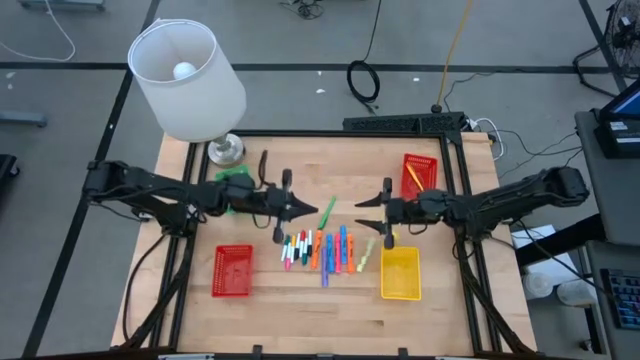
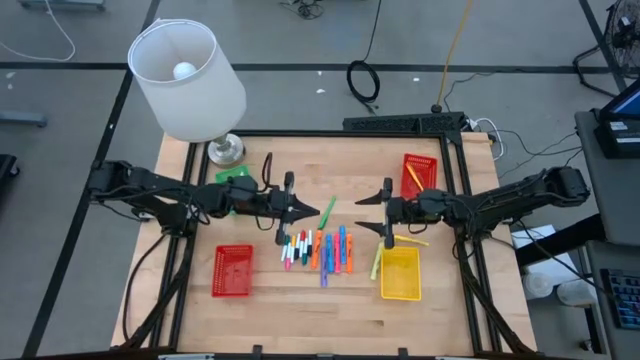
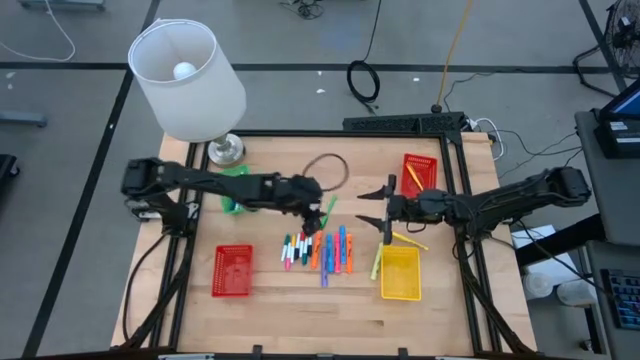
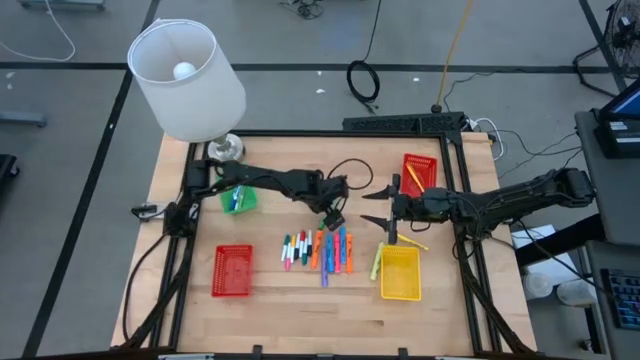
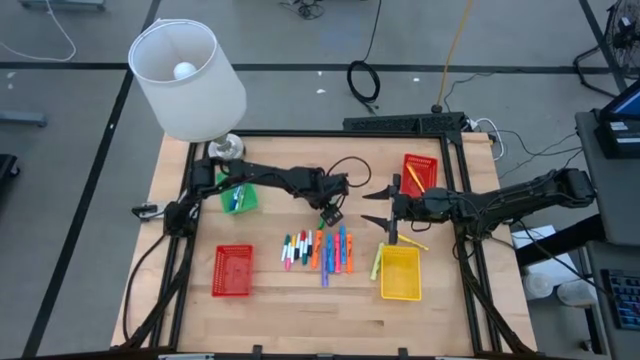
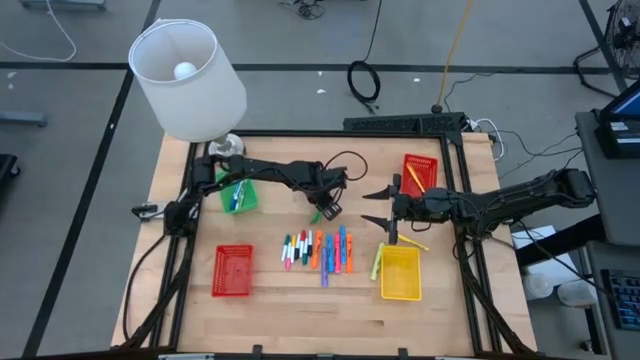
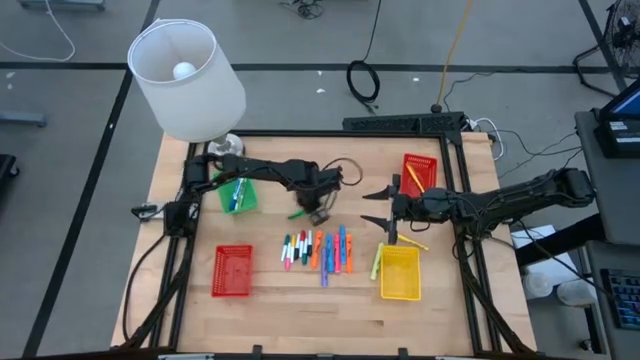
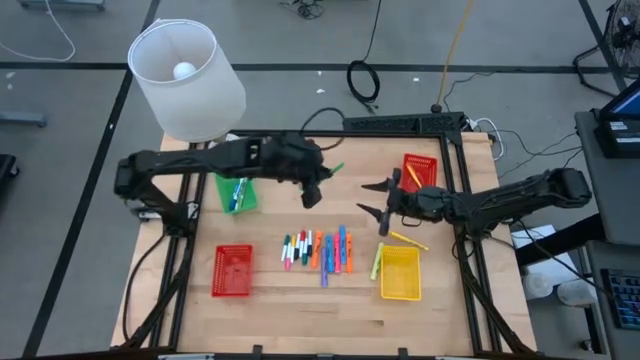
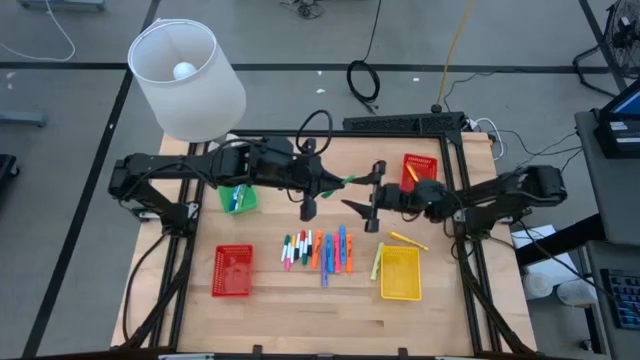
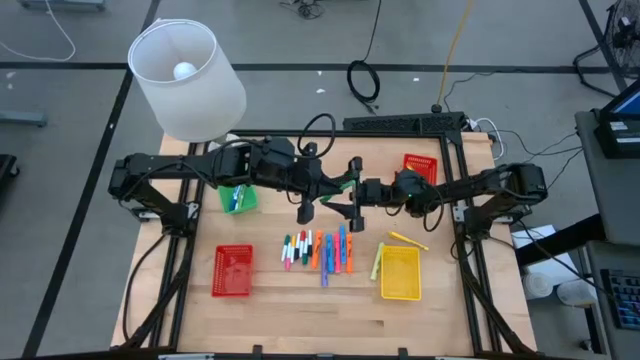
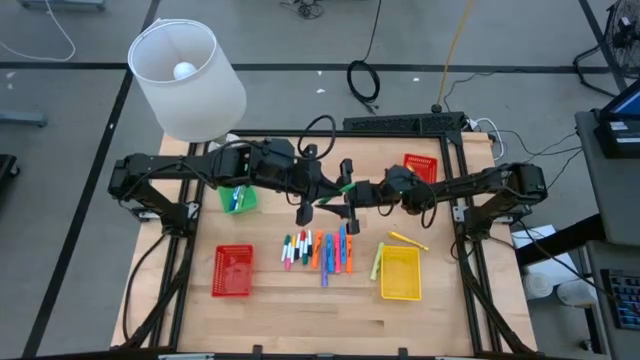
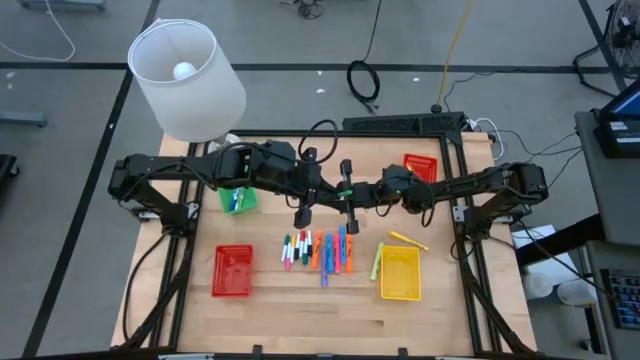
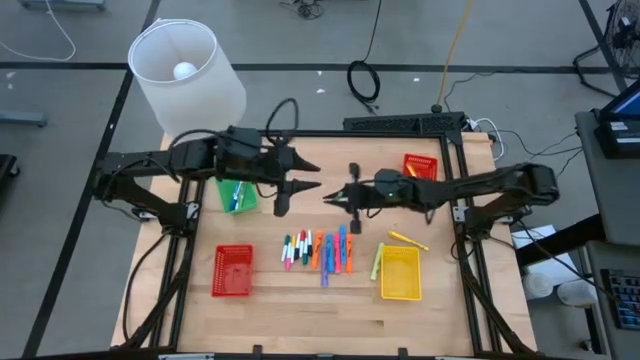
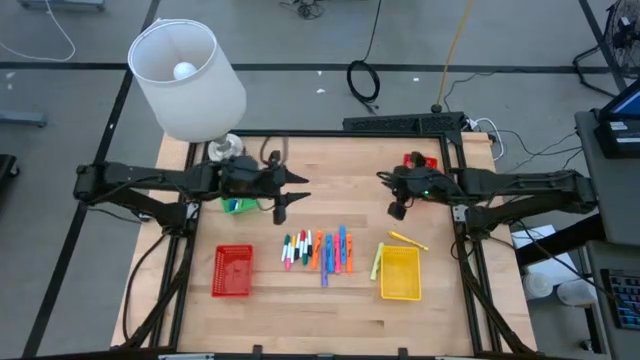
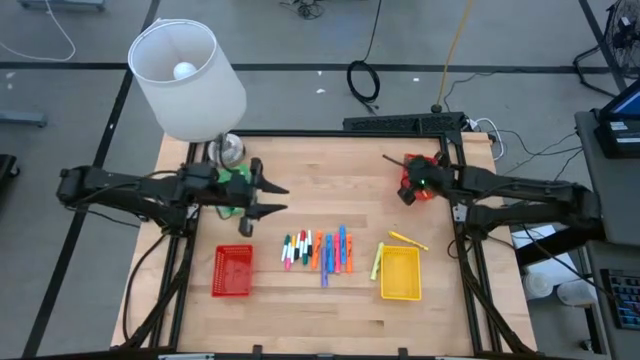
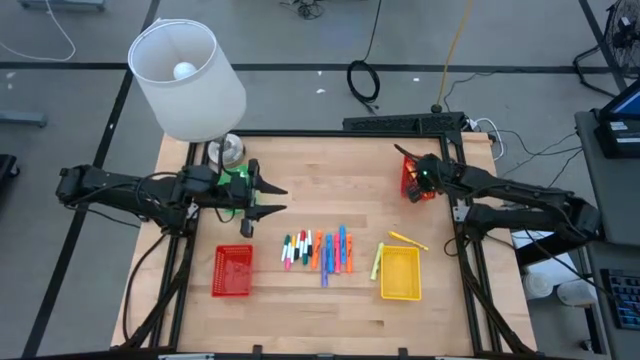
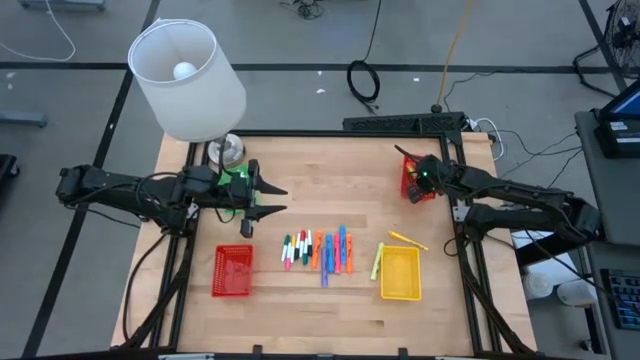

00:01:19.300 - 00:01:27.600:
Task: Pick & Place Markers
Put the green pen into the top red basket

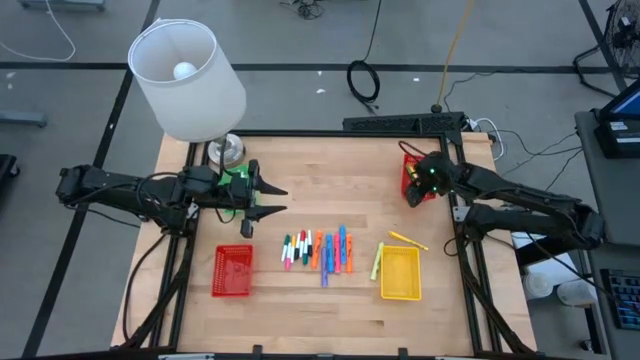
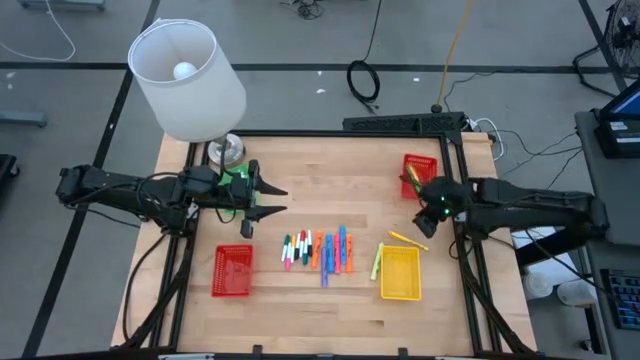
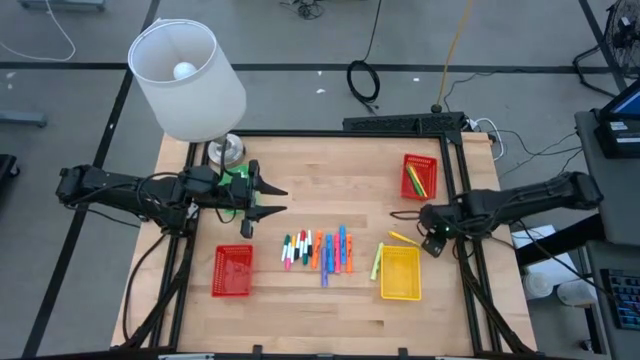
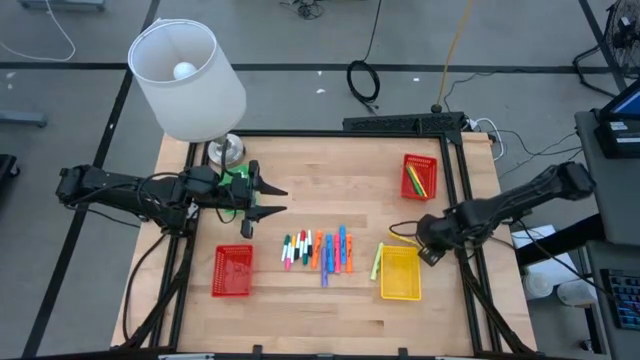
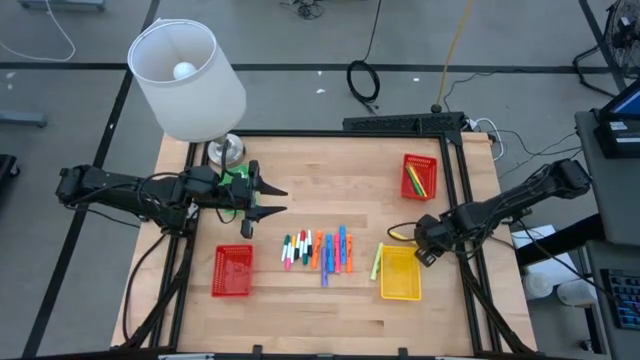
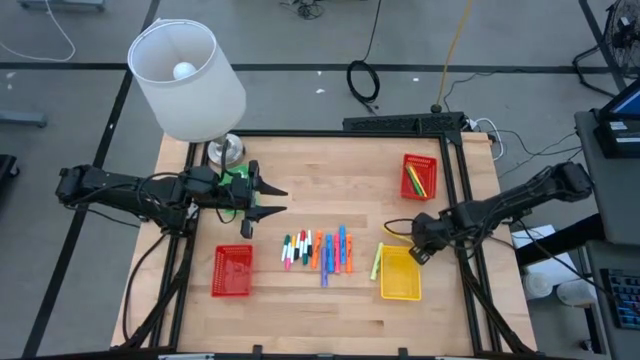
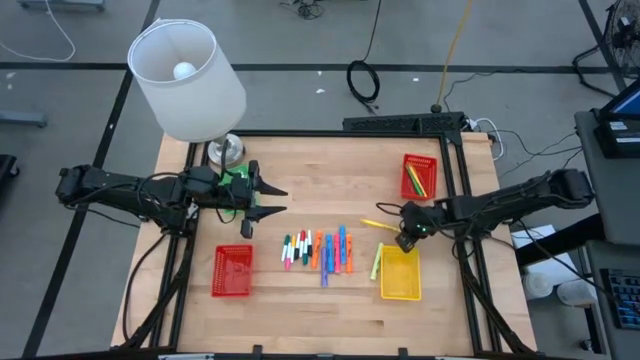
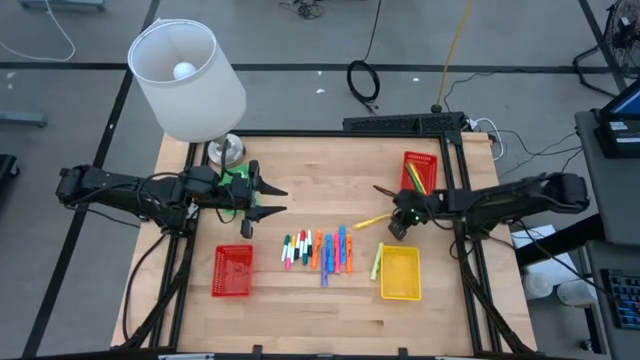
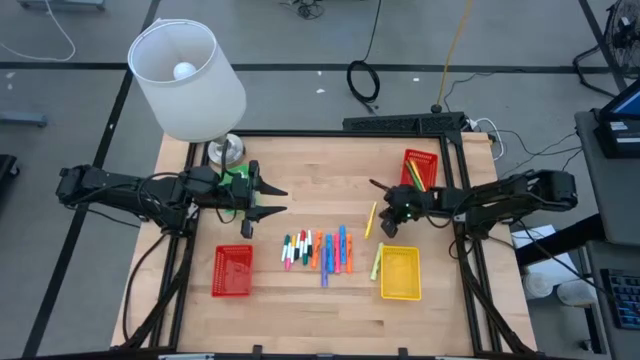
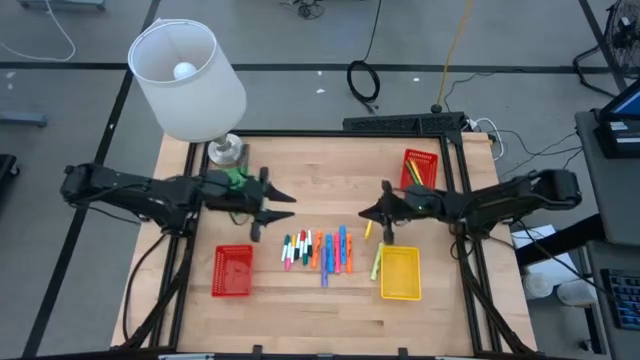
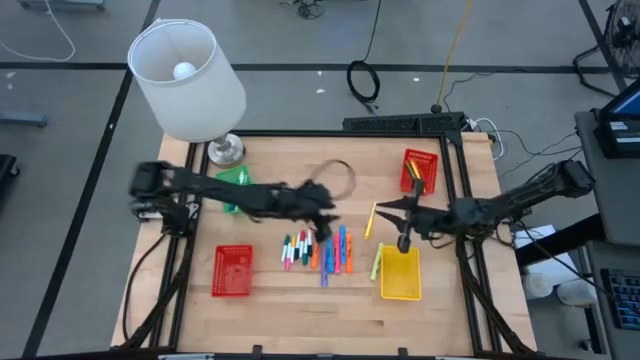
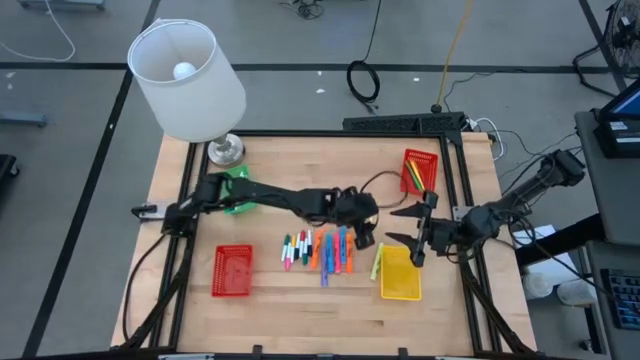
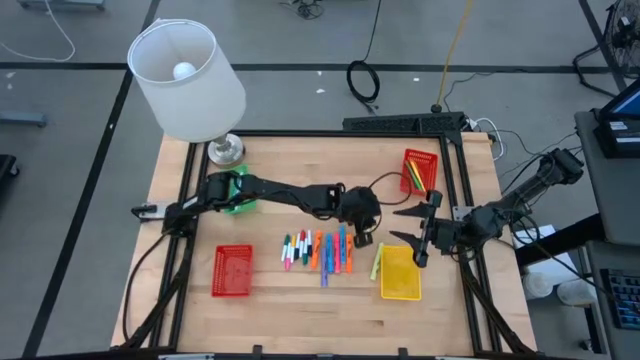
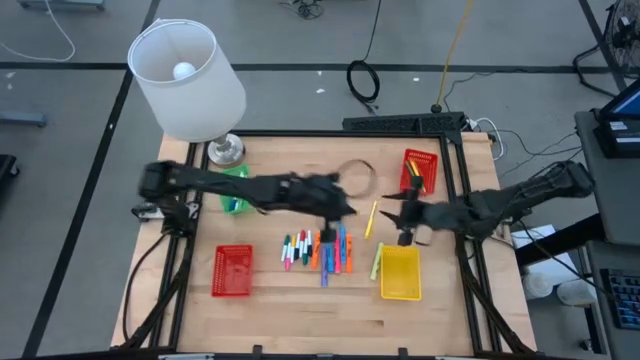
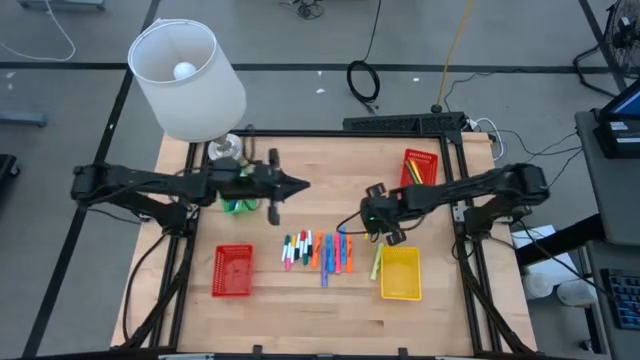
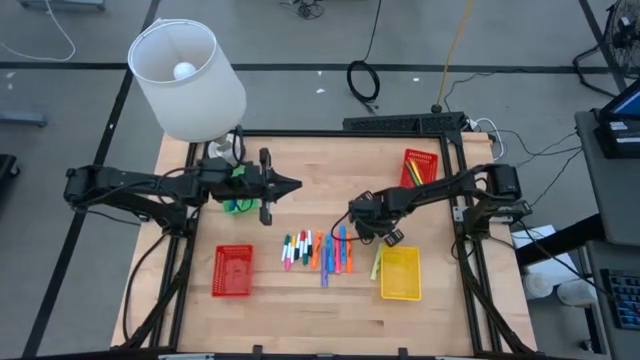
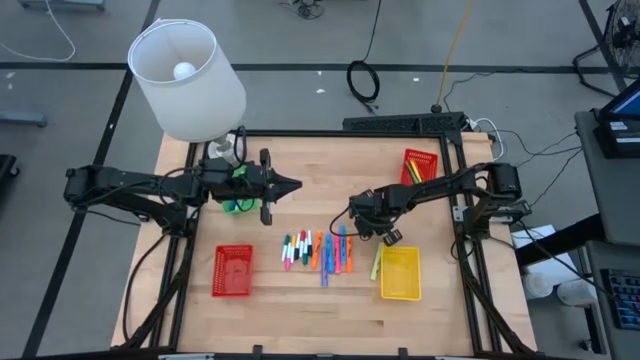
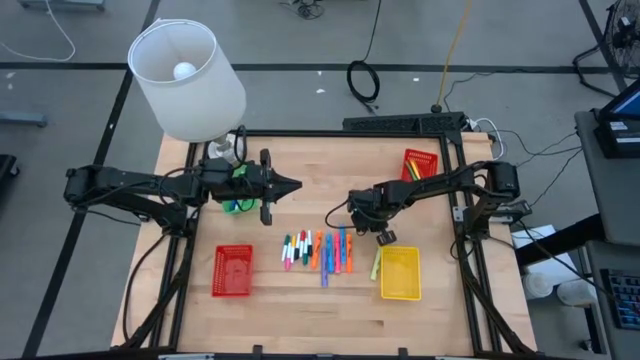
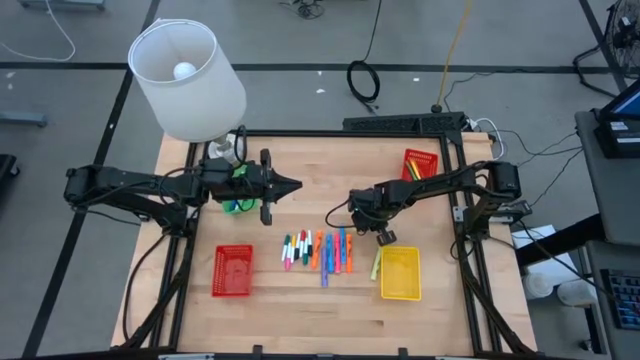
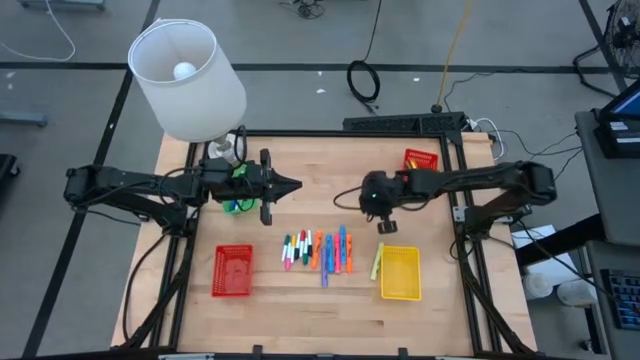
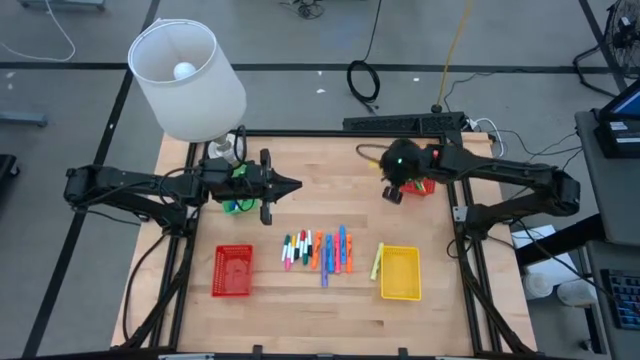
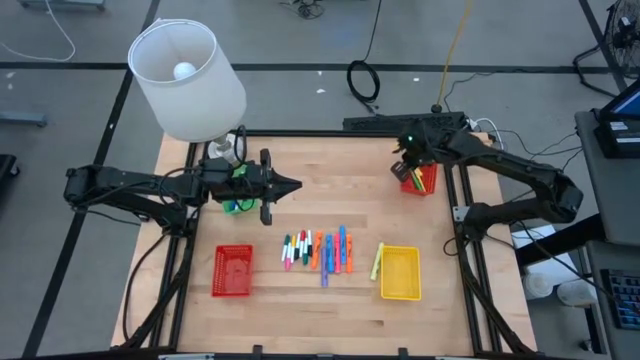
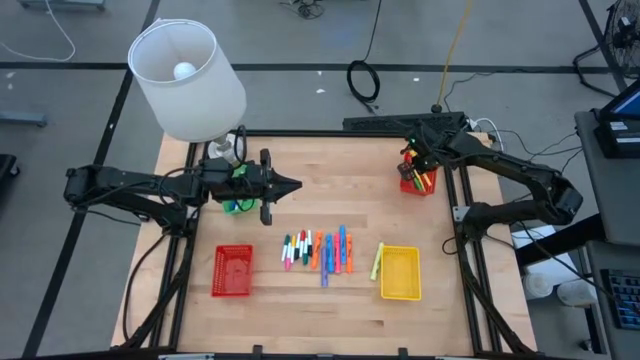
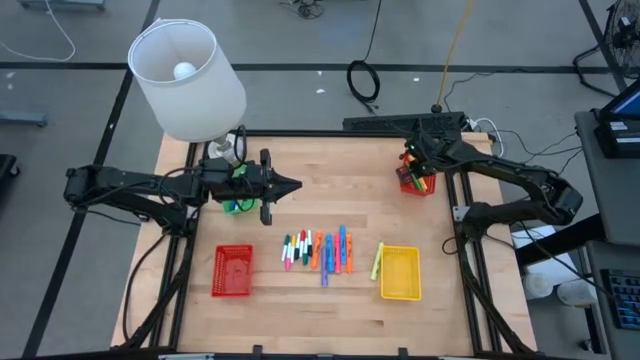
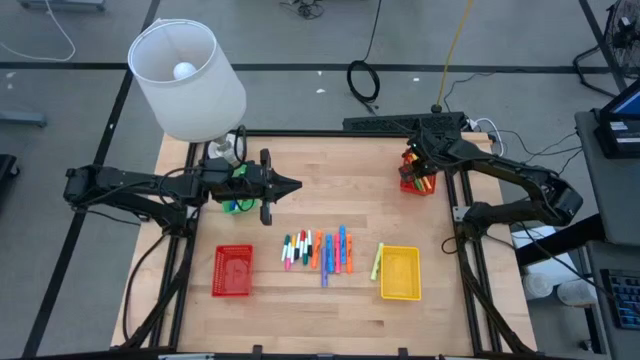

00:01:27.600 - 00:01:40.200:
Put the yellow pen into the top red basket
